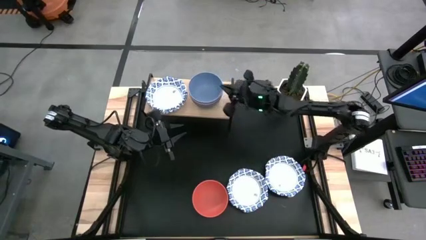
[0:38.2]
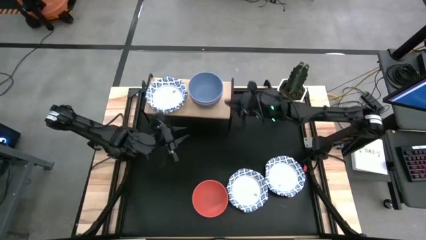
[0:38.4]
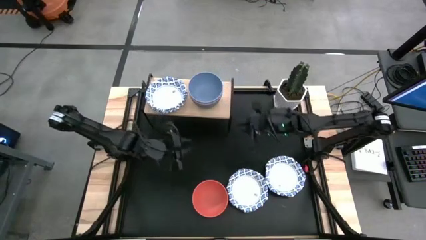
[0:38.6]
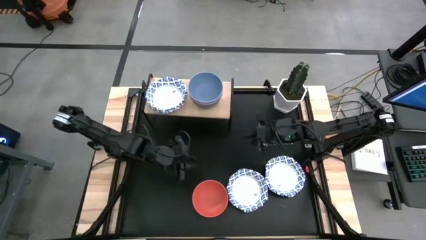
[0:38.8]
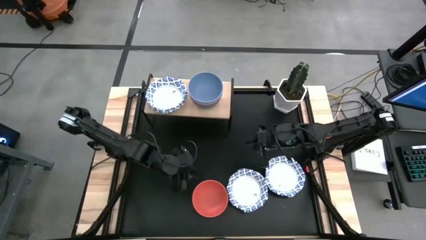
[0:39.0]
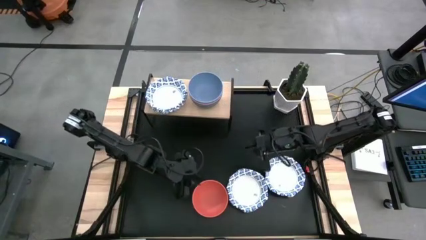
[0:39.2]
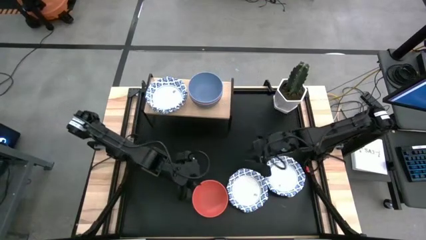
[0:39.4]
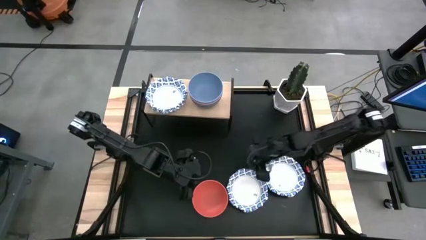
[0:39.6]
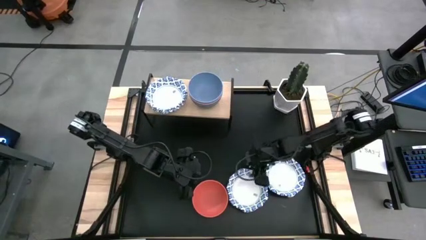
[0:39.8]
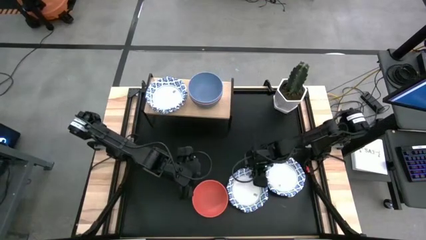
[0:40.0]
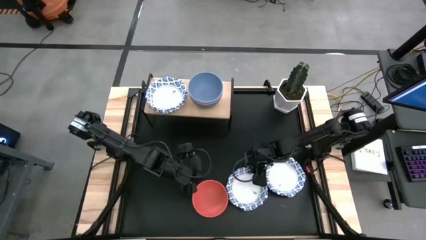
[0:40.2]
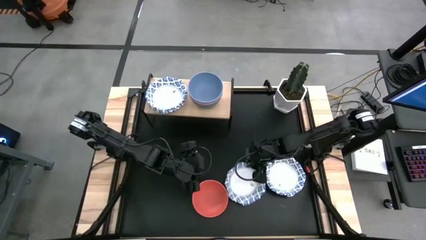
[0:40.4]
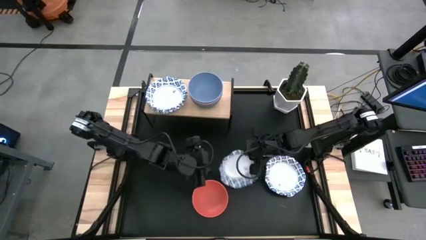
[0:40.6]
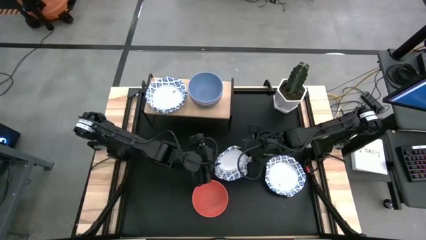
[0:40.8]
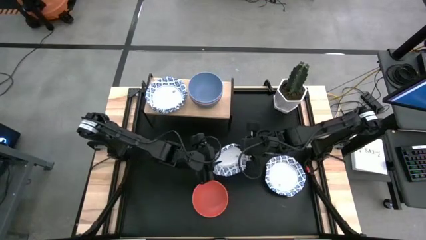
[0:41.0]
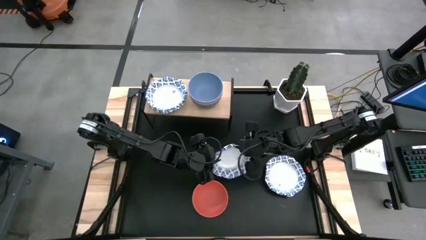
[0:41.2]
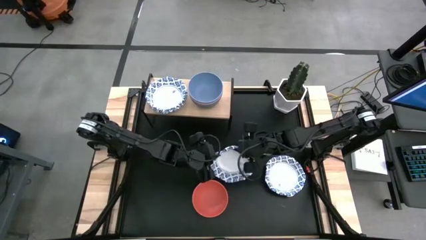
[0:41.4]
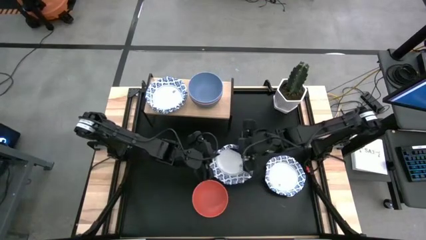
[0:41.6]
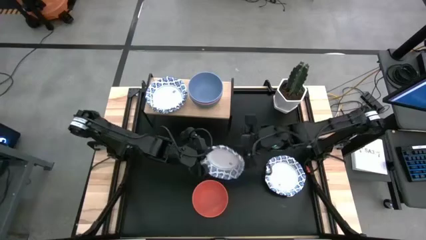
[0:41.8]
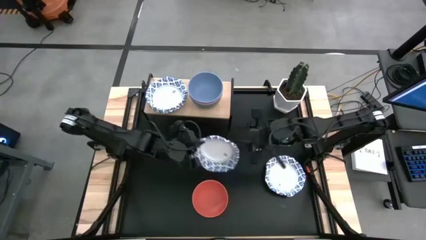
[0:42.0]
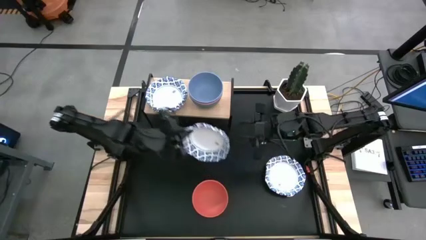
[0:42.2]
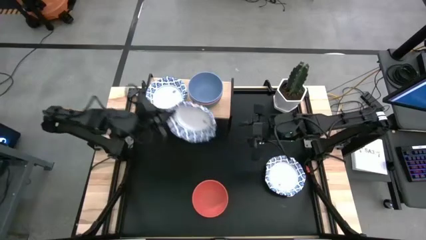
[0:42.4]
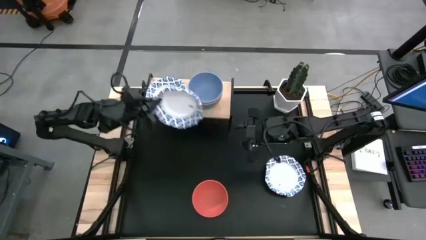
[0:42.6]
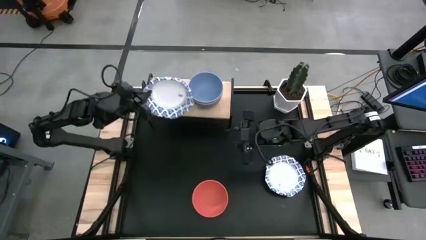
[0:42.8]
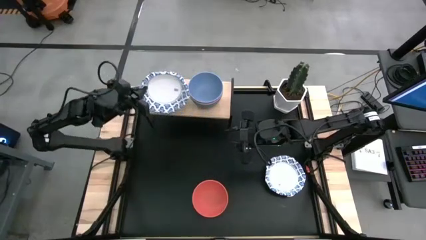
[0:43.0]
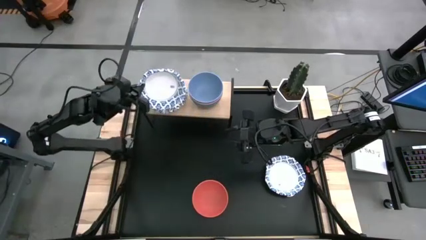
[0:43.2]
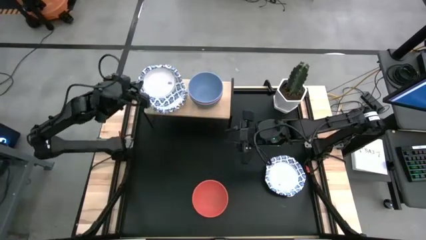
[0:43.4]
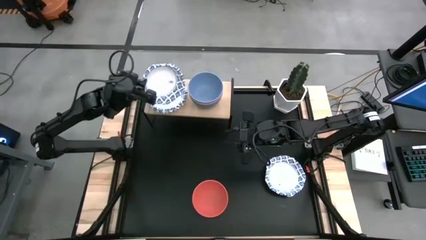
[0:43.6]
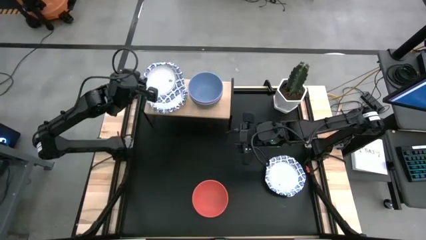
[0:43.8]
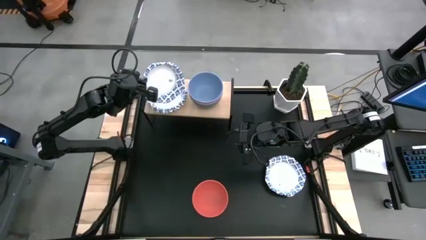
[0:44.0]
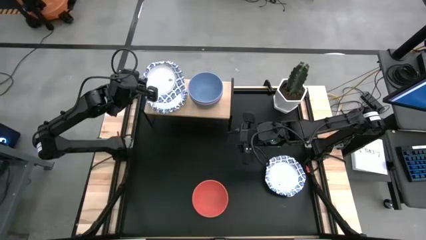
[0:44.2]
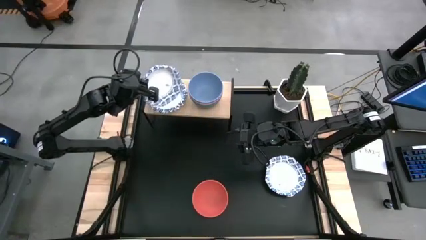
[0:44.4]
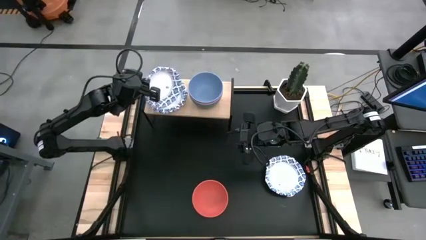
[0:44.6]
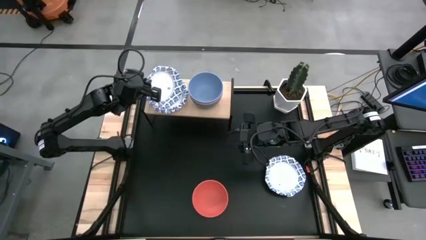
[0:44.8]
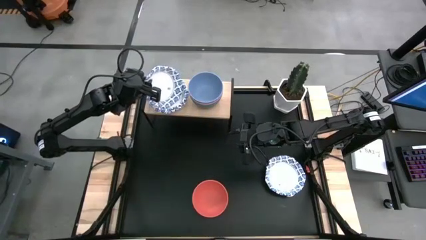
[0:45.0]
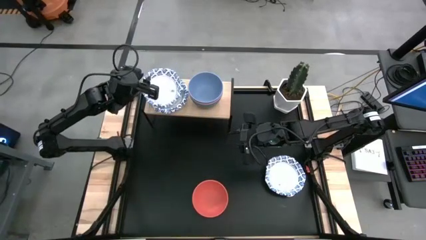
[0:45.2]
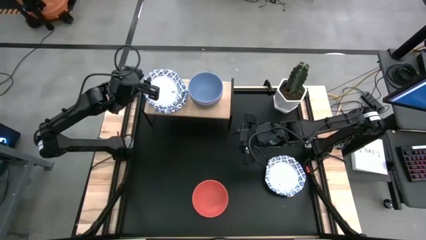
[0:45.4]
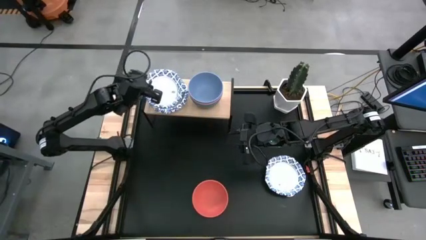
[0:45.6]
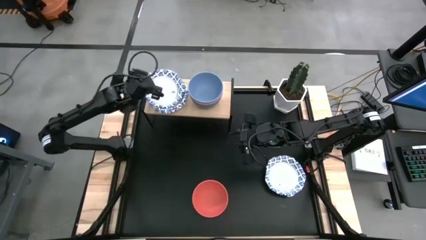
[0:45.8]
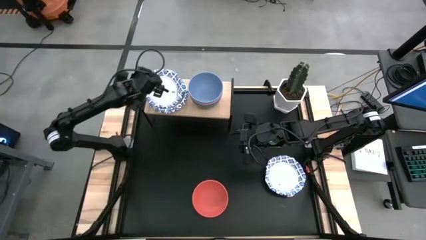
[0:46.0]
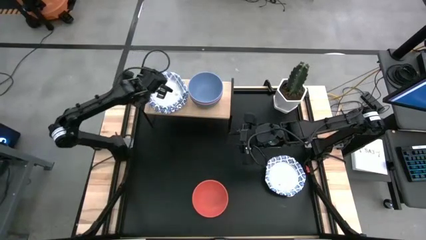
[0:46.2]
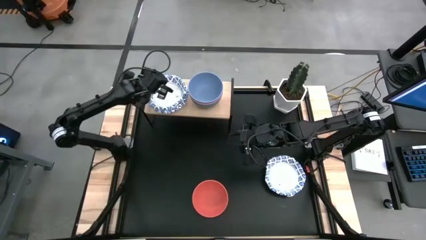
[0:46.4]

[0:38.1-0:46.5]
Task: Place and stack bowls onto a shelf
Stack the white patterned bowl on top of the white patterned bowl on the shelf

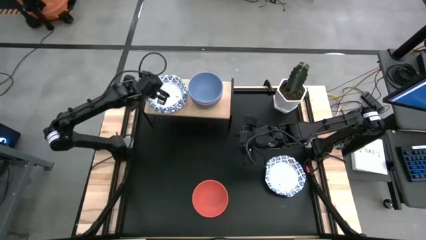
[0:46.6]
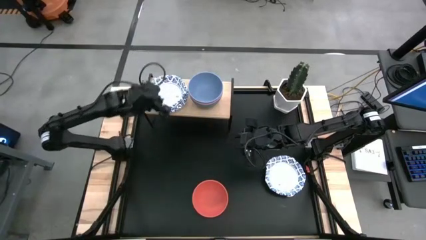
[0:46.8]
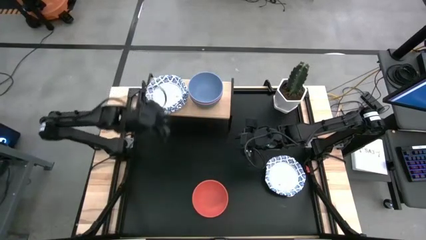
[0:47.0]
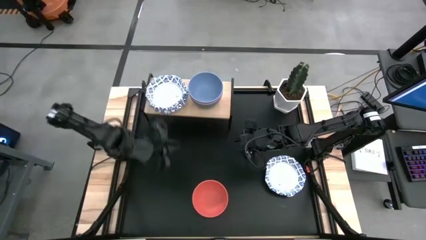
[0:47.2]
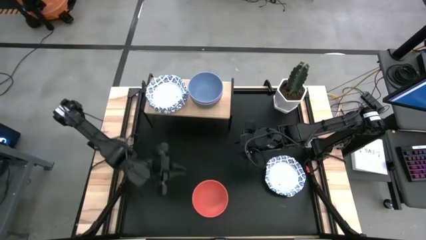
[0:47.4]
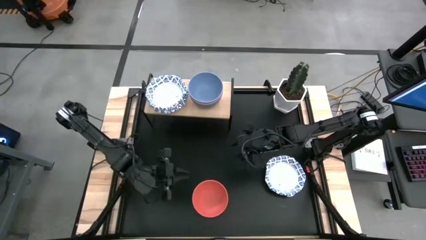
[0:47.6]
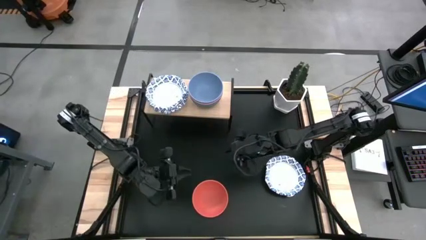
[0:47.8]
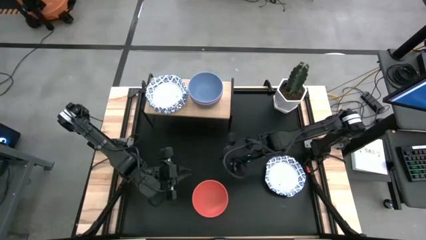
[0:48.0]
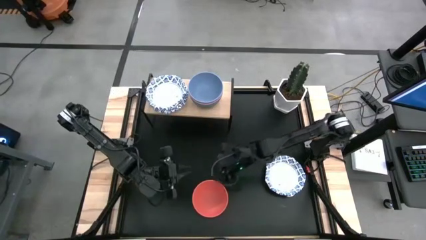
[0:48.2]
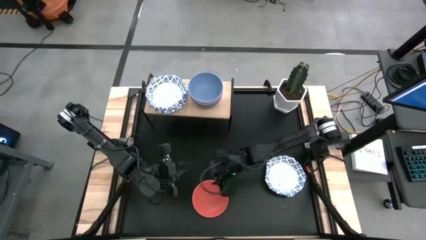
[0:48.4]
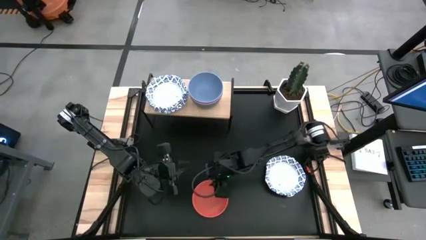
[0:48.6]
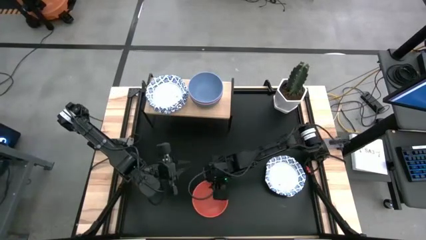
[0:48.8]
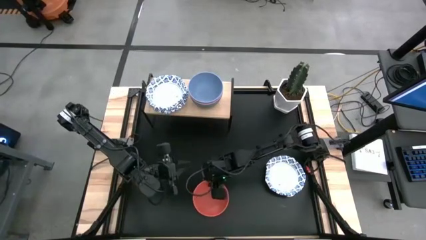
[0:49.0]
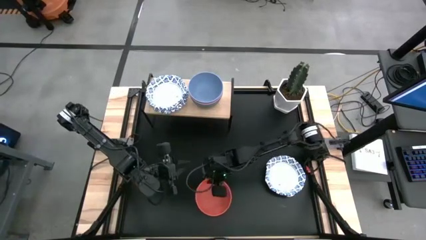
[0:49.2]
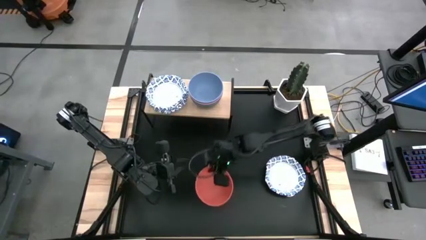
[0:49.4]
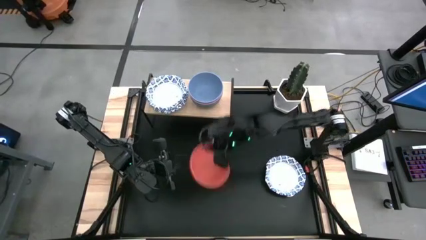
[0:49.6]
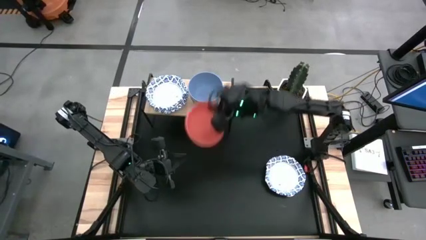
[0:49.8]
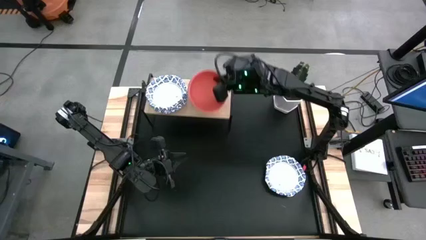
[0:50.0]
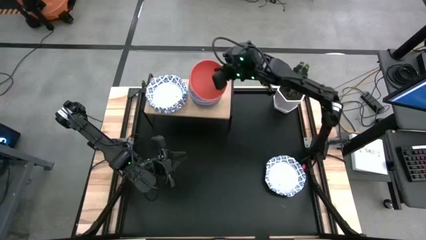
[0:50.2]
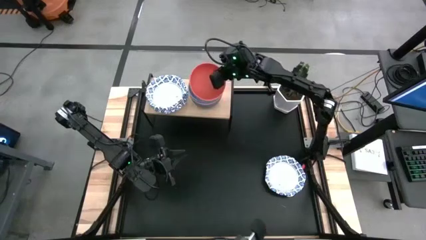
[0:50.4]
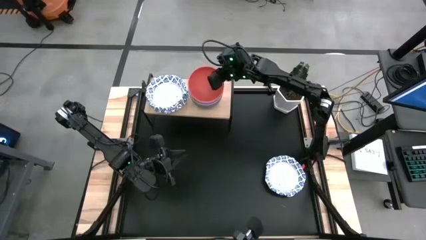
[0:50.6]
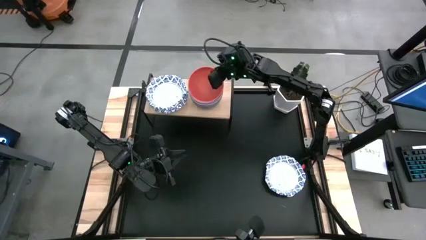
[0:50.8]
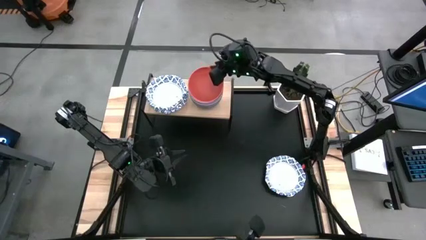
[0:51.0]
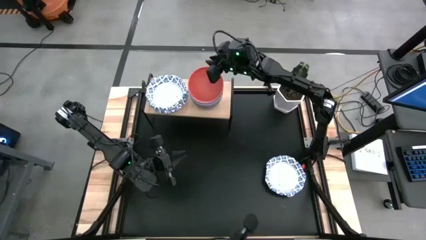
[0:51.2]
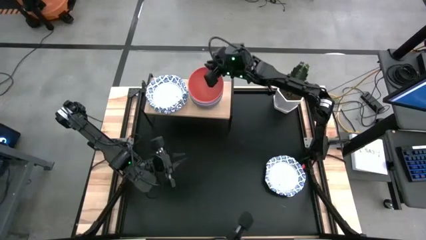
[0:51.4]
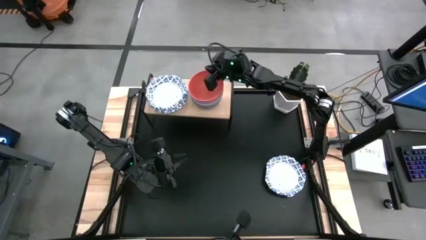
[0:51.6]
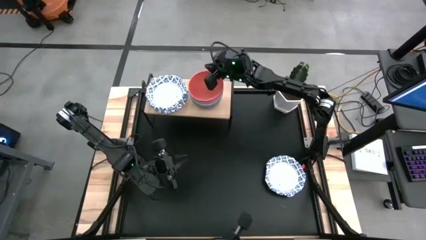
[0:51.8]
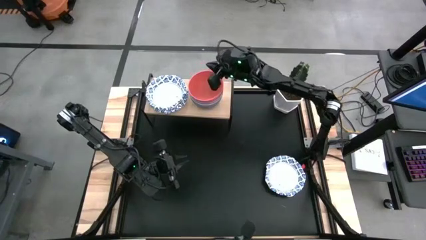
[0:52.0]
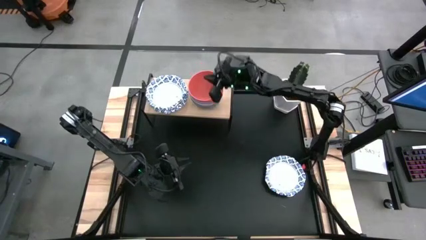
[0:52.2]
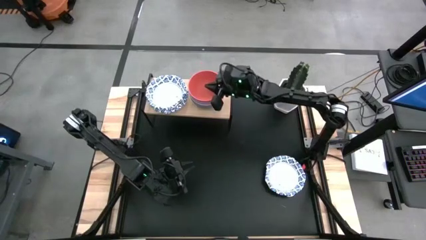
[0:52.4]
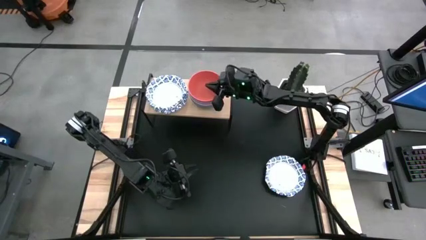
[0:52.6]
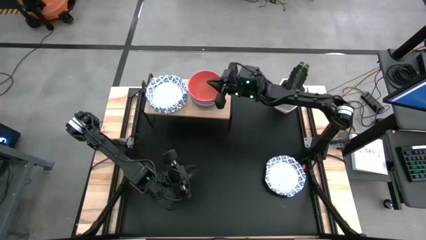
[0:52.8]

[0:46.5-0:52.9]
Stack the orange bowl on top of the blue bowl on the shelf
